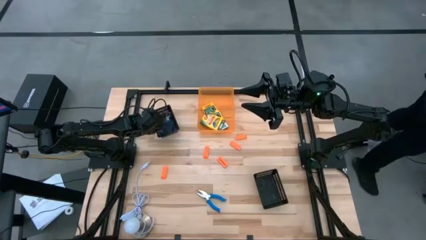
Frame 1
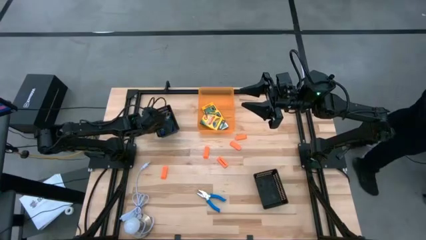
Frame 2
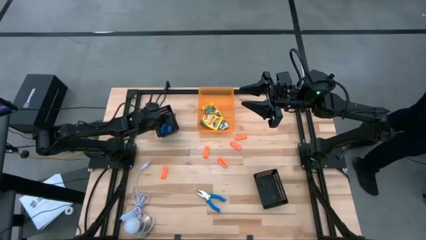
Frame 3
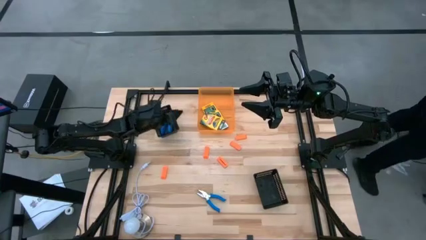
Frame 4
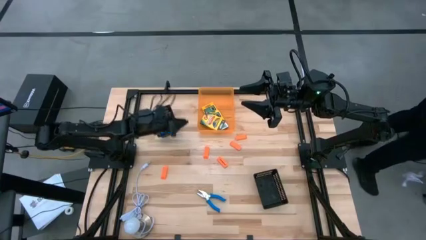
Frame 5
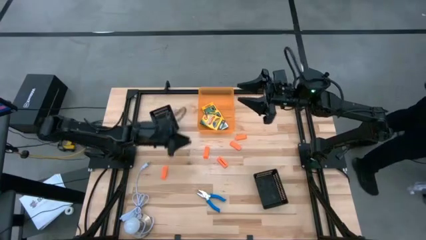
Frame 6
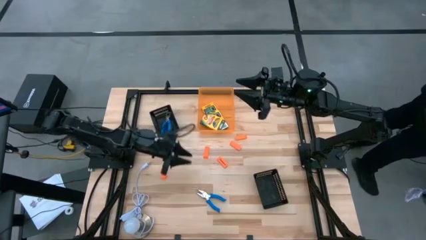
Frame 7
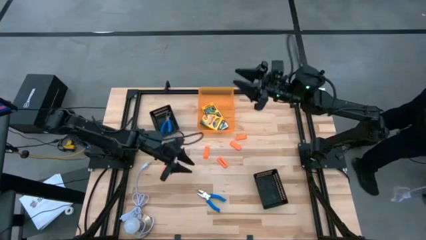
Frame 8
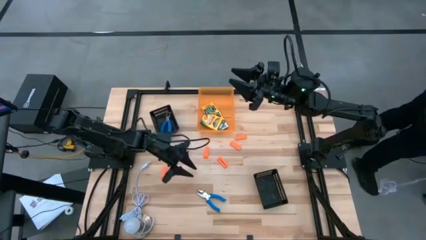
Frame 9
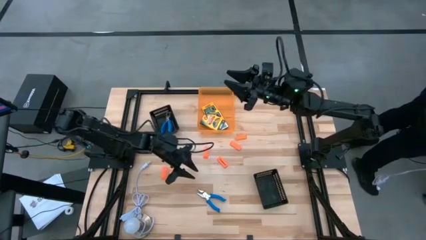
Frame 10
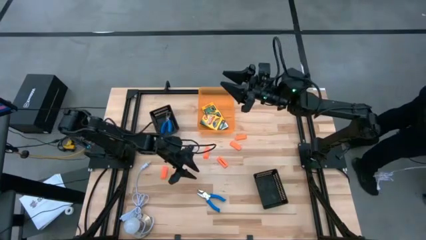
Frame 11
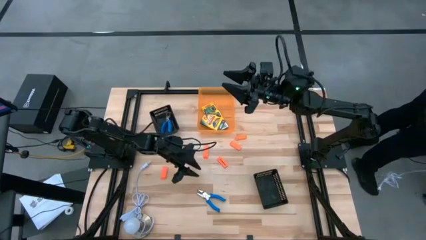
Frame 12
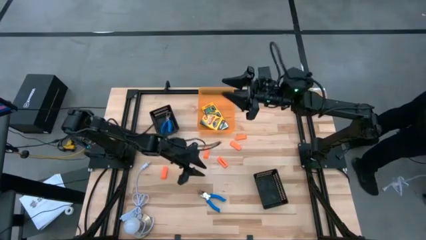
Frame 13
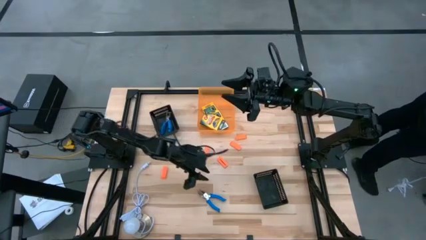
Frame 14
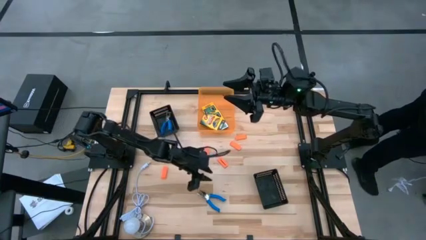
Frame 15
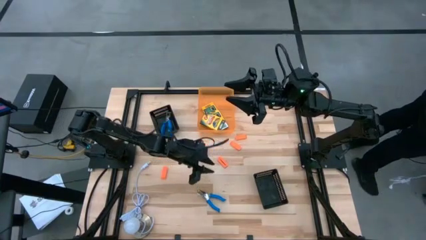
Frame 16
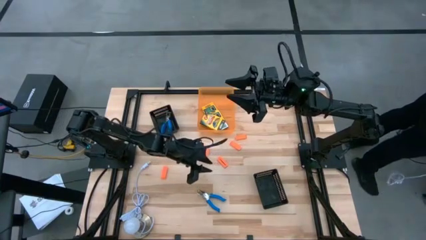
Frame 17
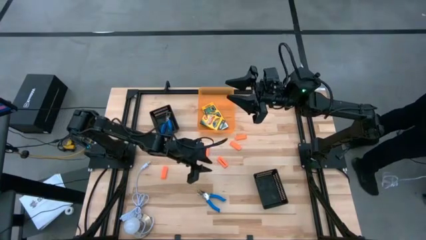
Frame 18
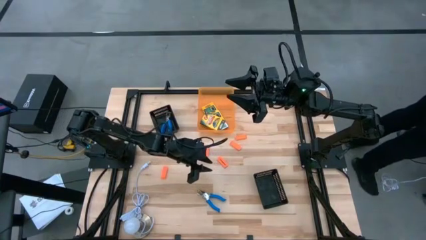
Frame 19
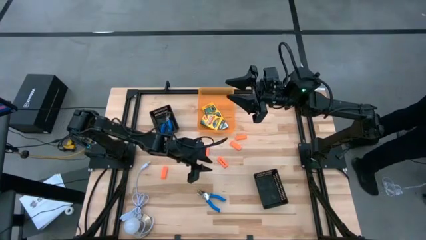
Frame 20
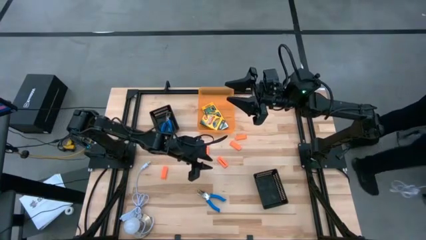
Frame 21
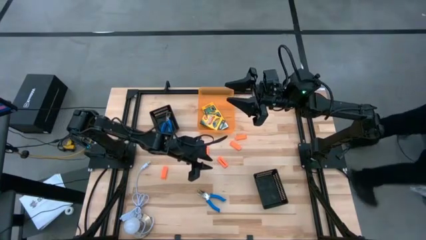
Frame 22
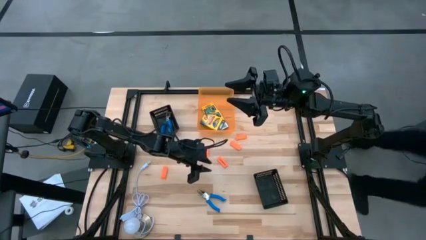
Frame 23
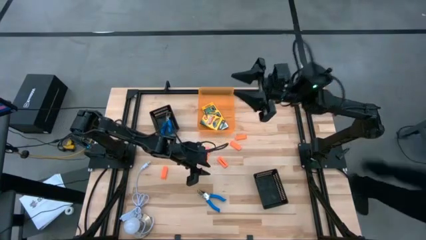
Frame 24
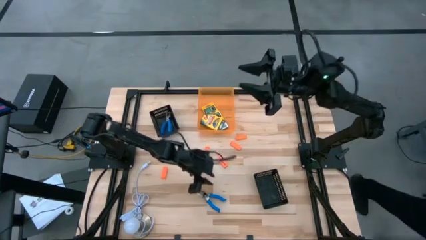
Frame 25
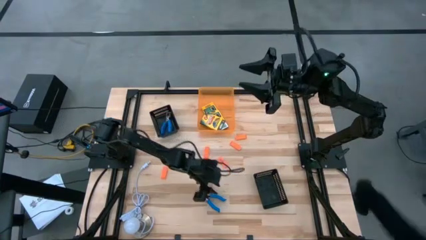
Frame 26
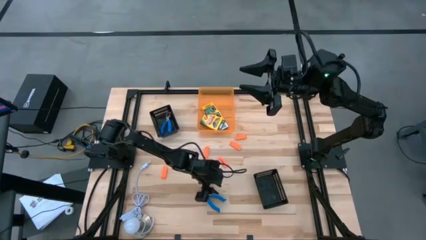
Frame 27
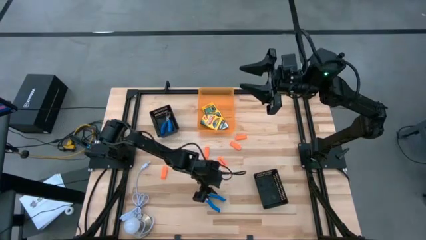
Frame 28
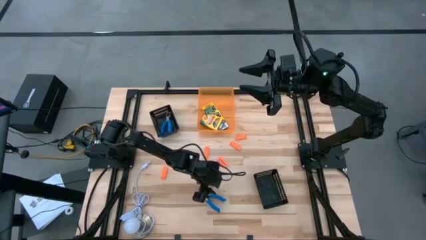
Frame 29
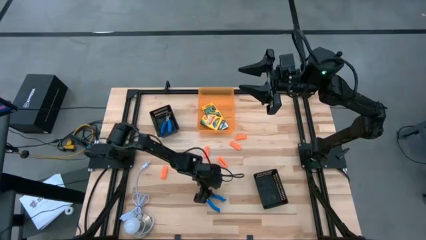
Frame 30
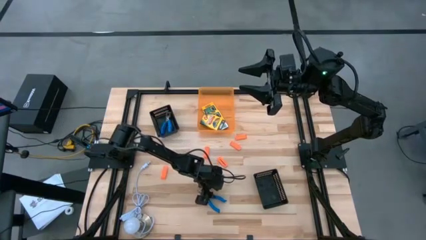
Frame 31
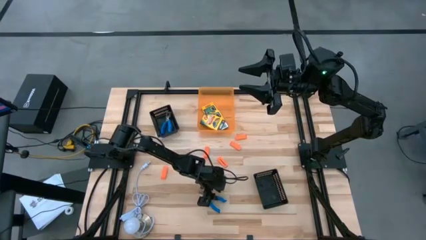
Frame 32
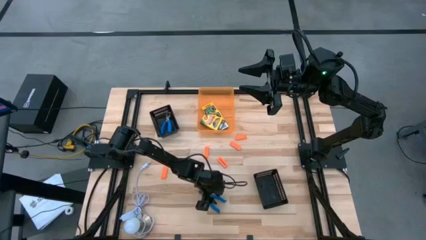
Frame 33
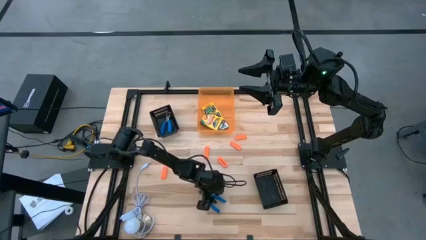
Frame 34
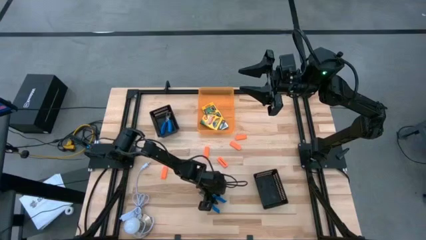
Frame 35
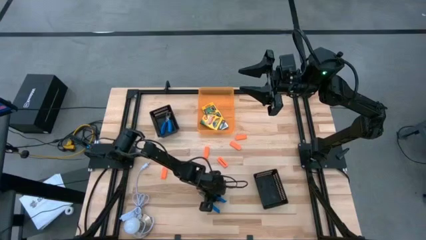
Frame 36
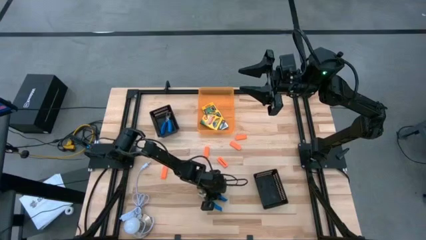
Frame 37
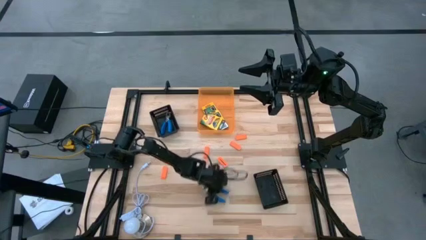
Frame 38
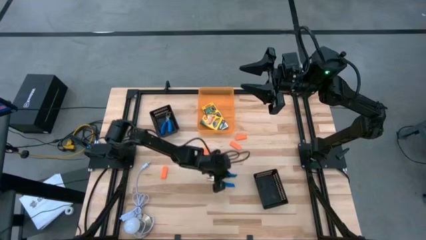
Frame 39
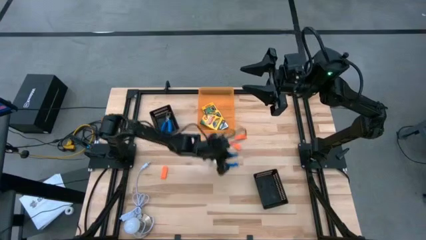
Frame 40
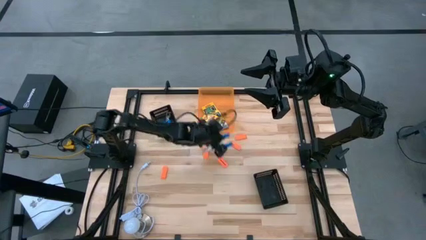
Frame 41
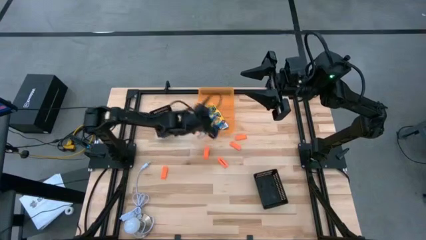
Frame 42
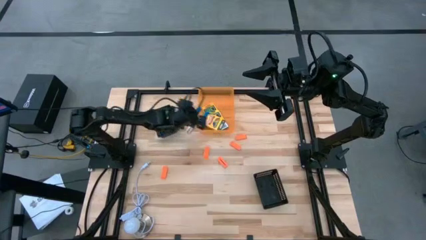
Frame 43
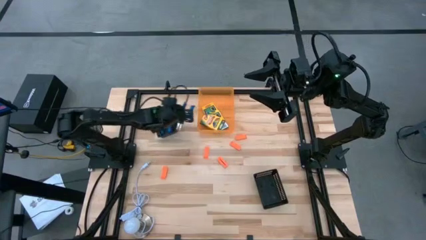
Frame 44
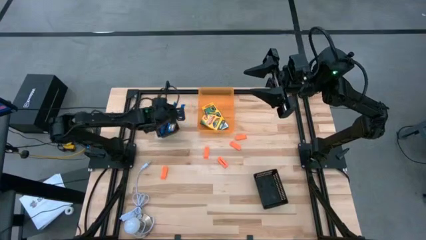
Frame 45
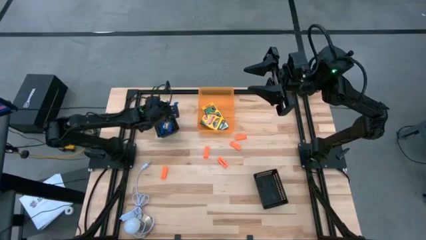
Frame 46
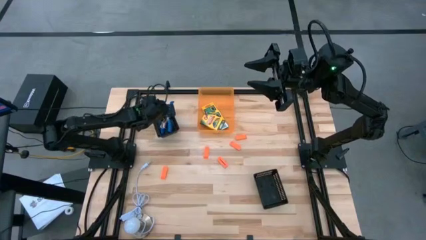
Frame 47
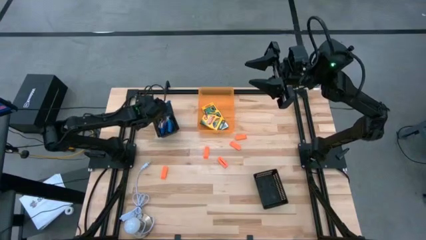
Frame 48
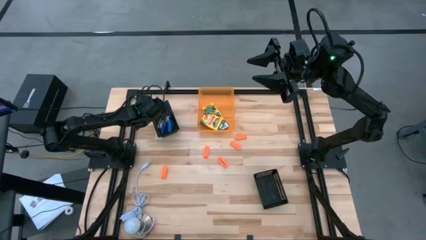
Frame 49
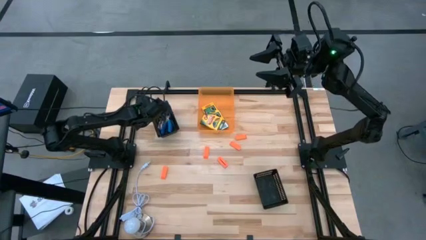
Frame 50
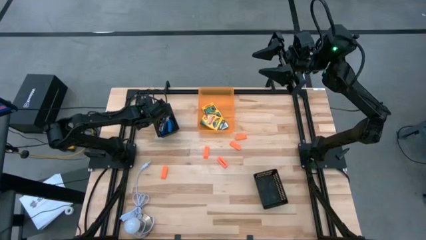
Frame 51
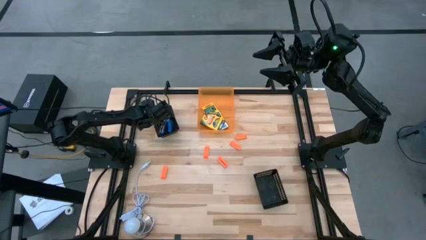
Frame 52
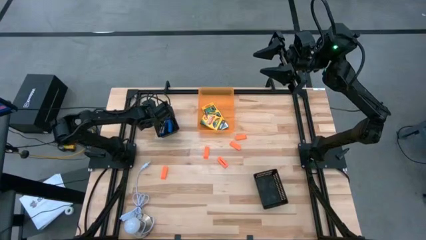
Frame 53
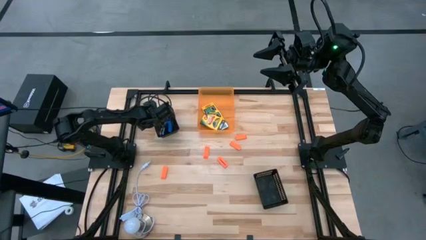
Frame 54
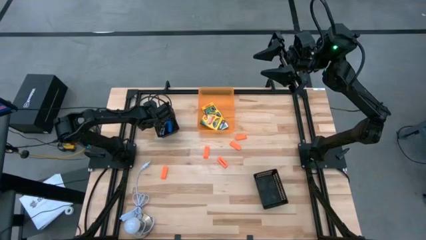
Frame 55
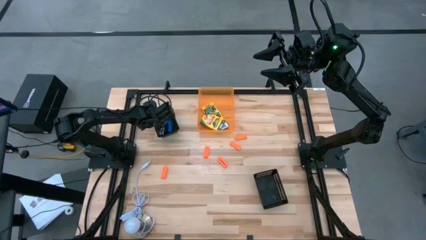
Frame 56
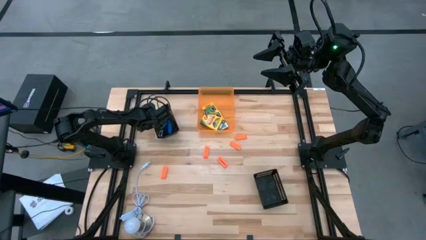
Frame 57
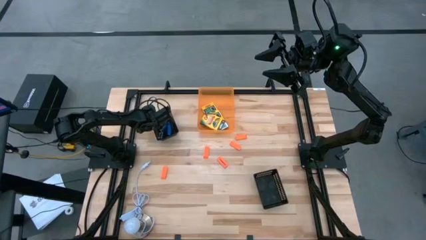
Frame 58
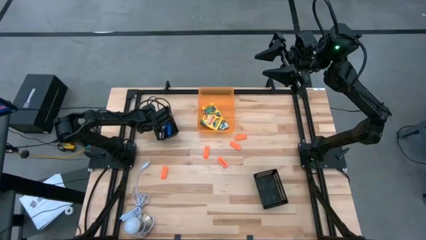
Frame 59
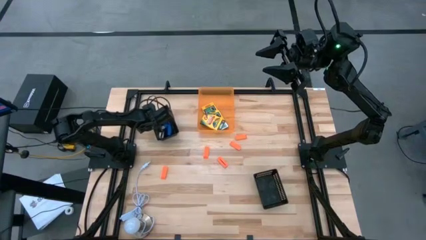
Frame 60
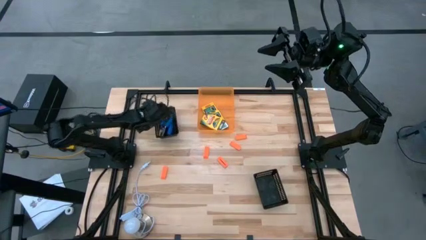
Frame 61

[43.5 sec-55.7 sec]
Task: Pick & Place School Supplies
Put the blue hole puncher into the top black bin

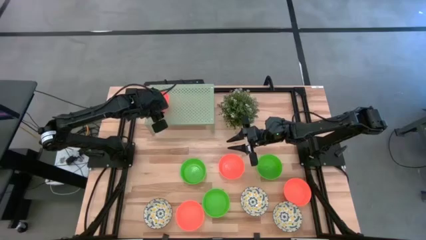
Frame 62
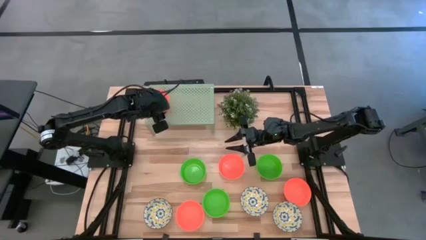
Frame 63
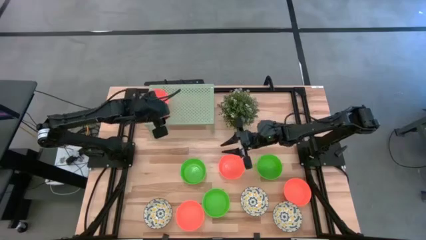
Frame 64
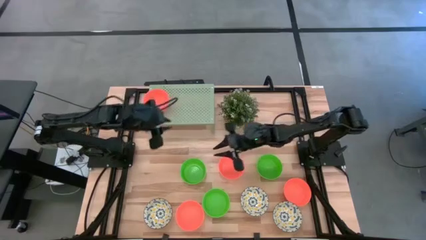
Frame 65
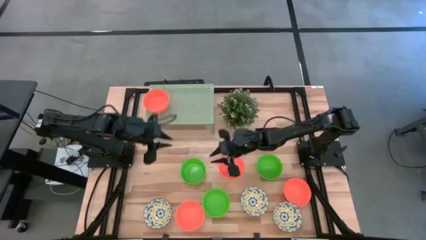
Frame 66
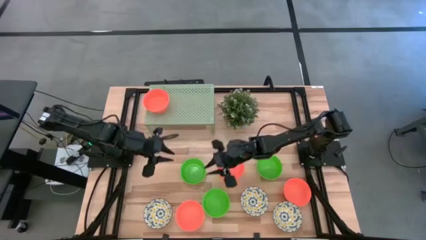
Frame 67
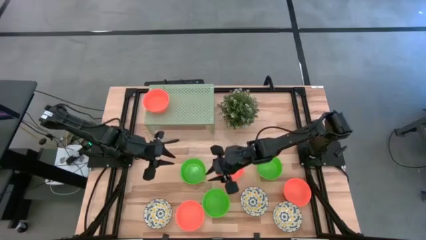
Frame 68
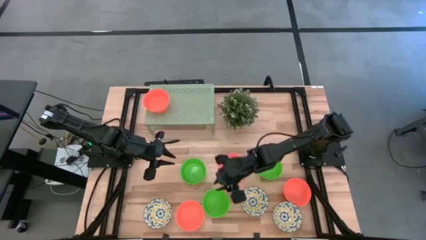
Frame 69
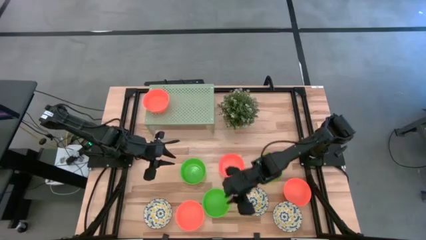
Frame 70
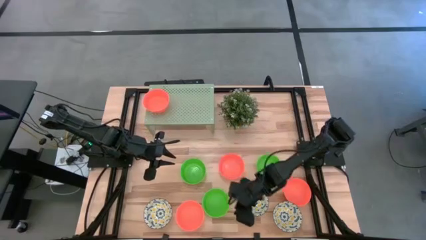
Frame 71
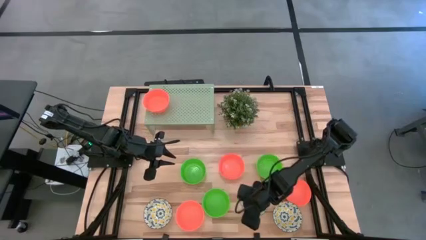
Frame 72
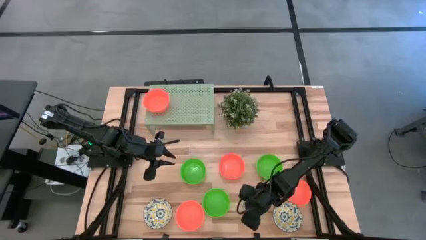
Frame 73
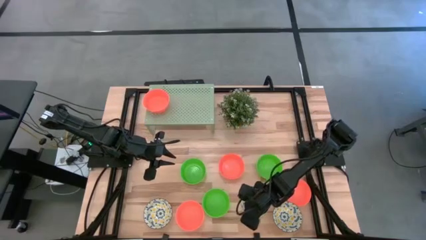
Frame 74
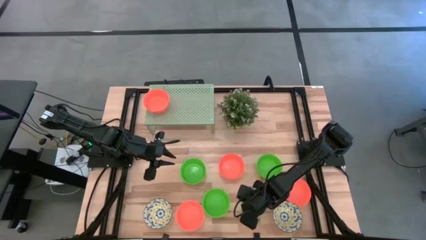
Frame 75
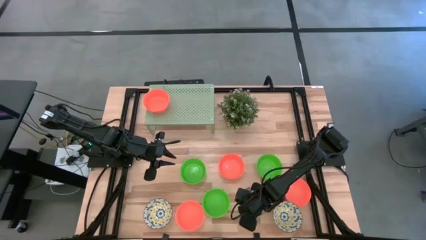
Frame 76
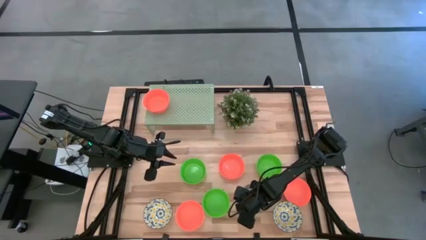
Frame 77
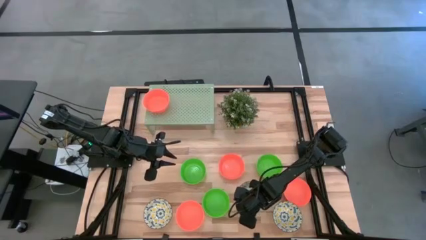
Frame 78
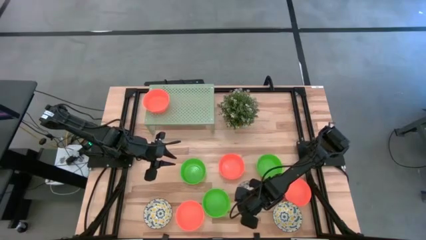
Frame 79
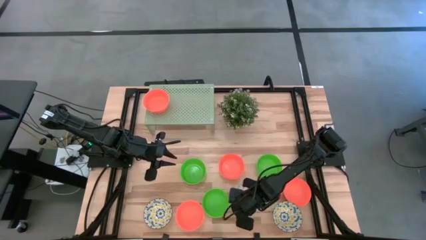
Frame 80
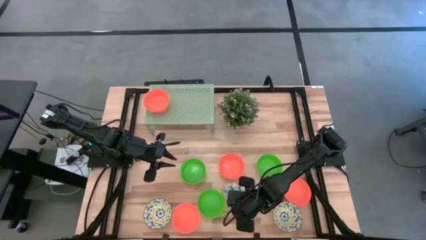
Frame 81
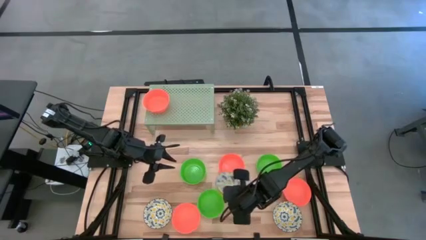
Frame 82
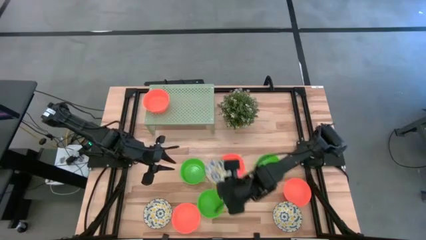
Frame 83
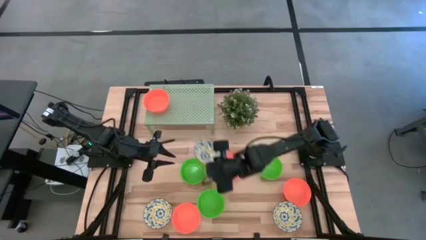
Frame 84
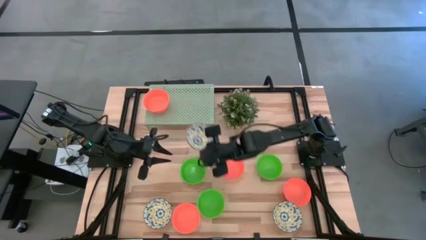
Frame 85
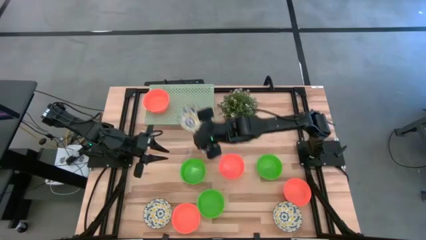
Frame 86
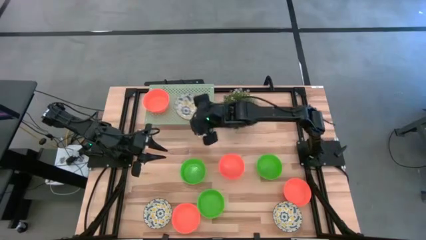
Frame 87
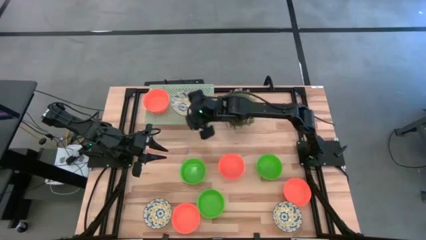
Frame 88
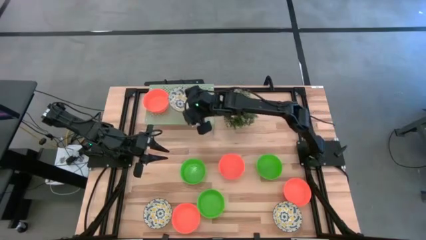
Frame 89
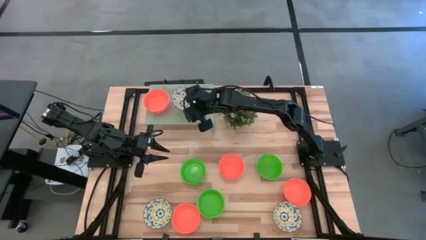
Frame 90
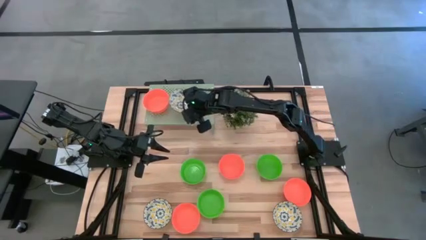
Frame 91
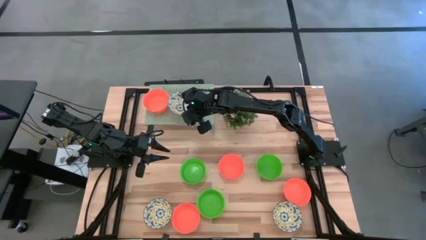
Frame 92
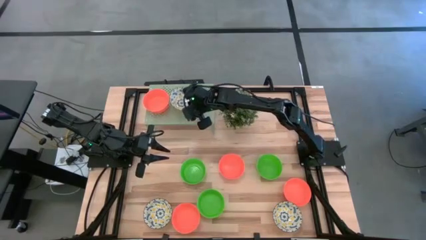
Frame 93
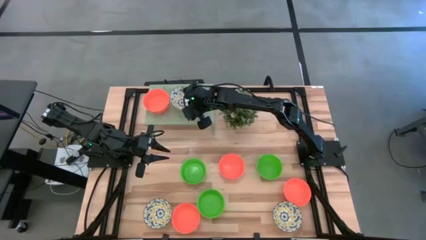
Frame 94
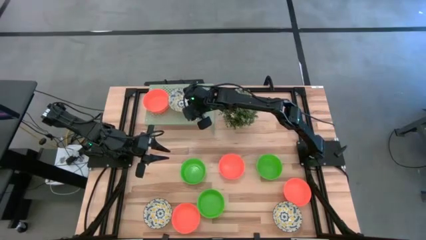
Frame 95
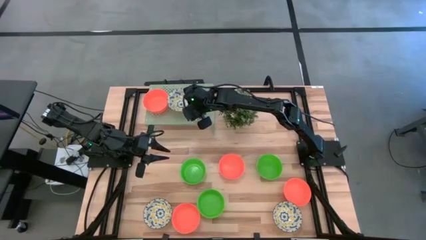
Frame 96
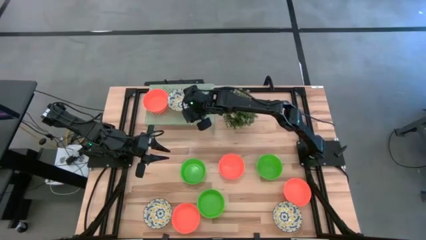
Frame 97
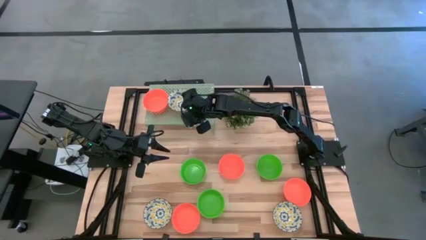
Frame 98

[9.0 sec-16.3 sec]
Task: Pick & Place Mini bowls
Put the white patterned bowl on the shelf
